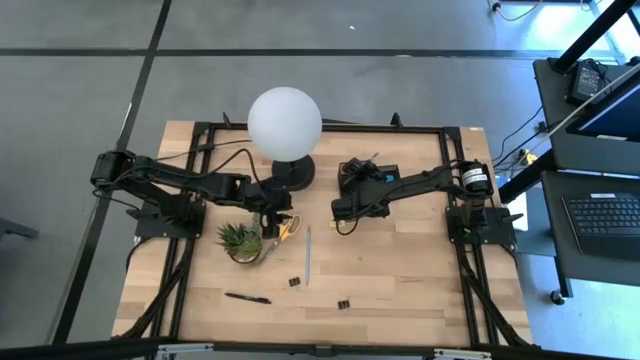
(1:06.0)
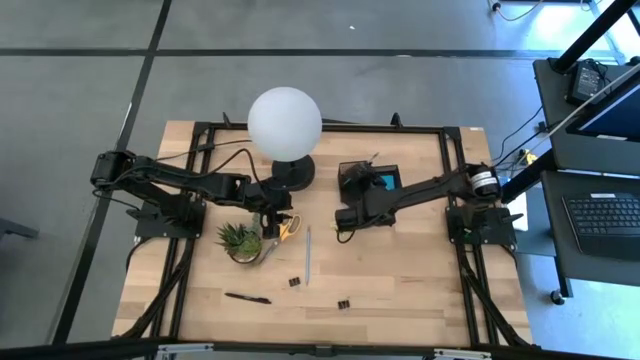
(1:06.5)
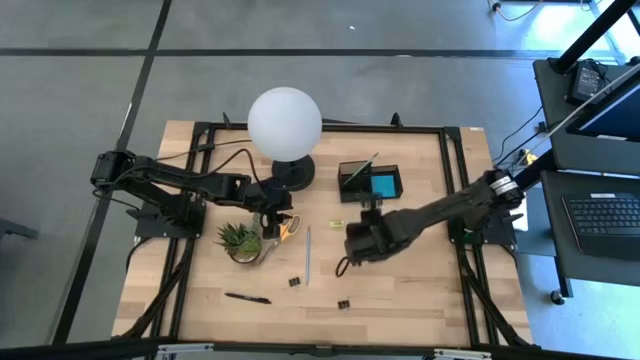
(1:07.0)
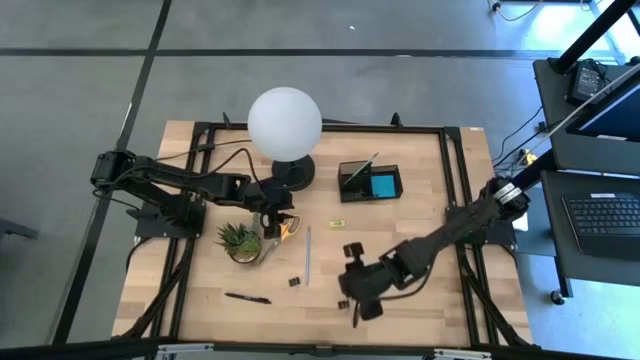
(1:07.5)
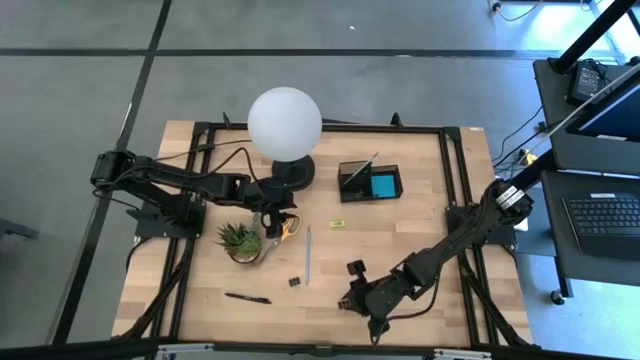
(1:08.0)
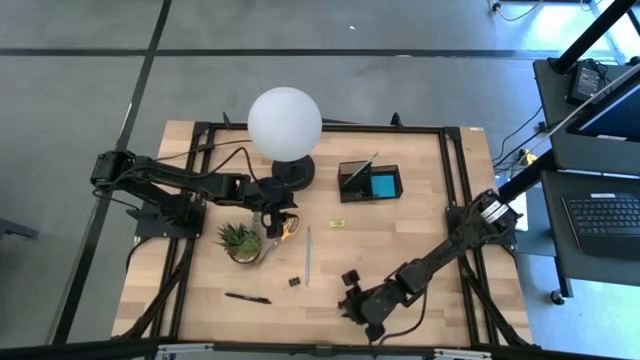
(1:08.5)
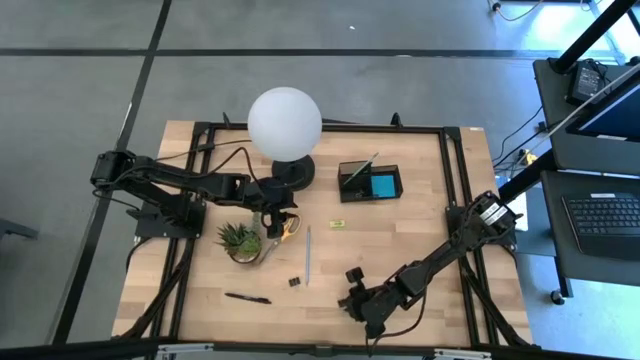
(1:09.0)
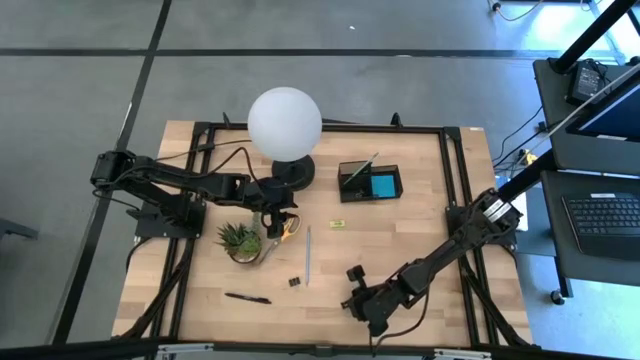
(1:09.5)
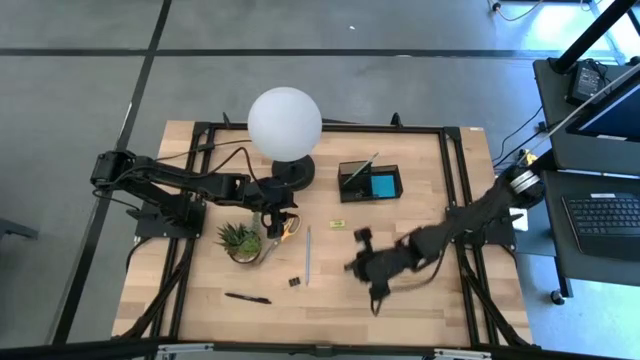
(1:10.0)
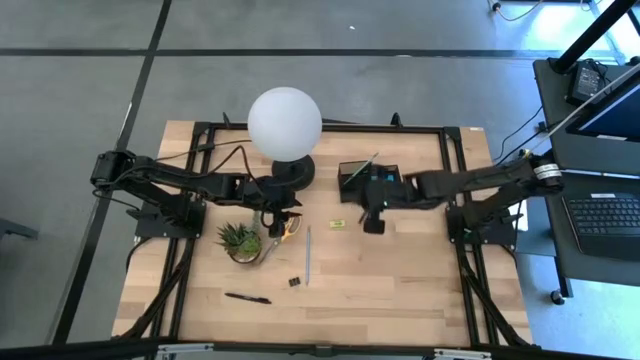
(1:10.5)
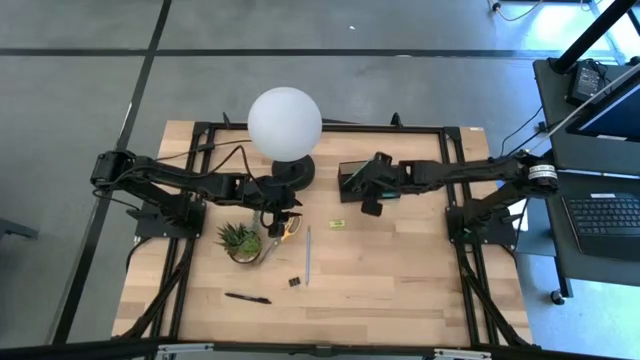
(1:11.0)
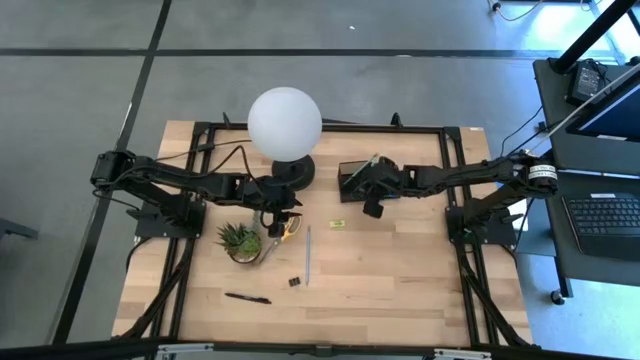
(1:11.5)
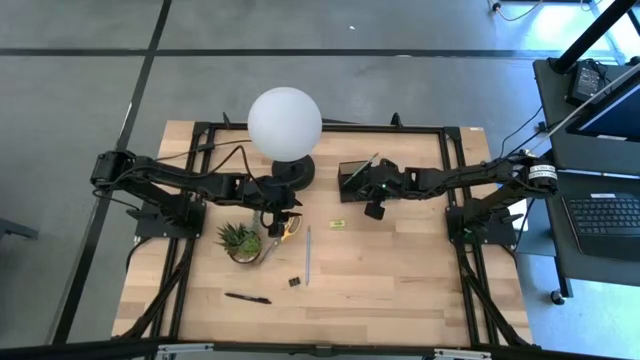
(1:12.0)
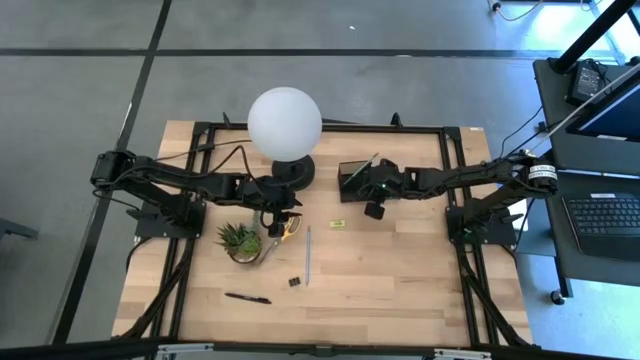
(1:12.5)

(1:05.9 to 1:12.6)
Task: Pick and place office supplies into organizer
Put the right black binder clip into the desk organizer

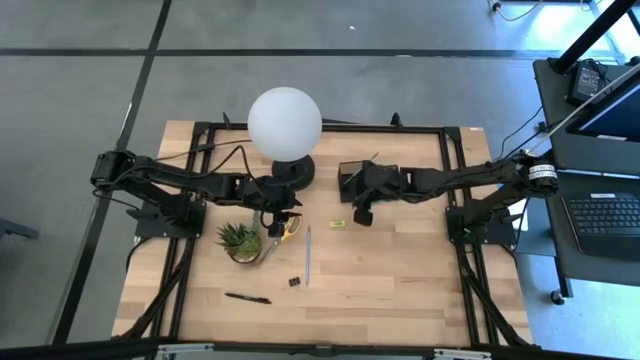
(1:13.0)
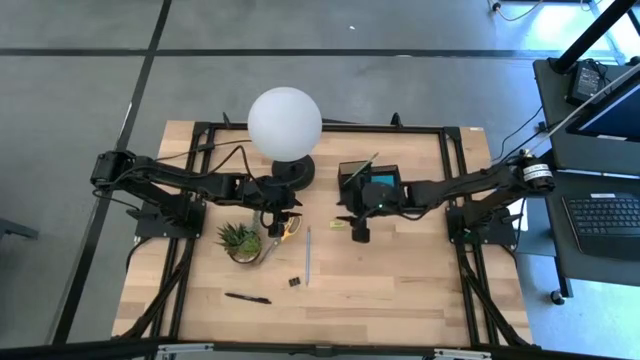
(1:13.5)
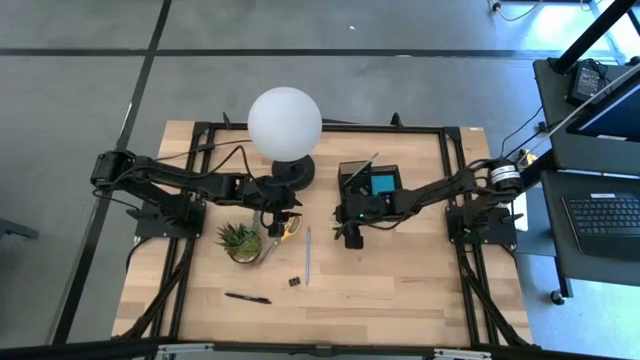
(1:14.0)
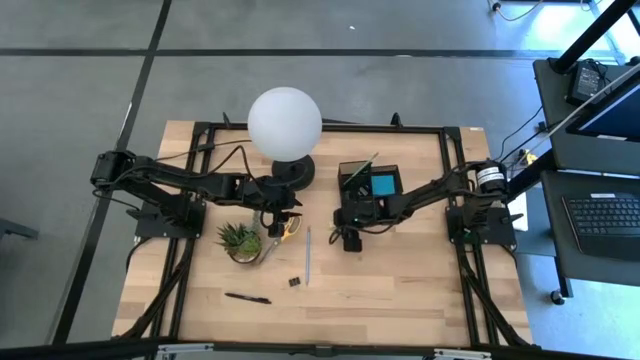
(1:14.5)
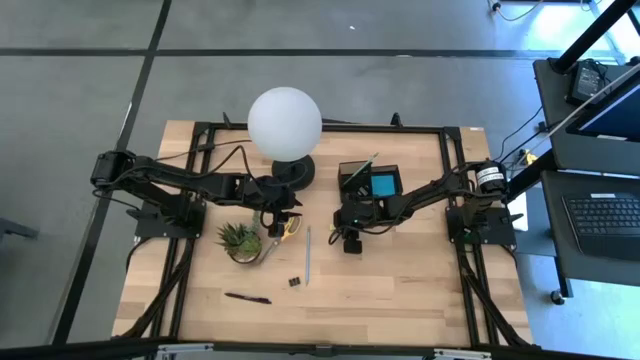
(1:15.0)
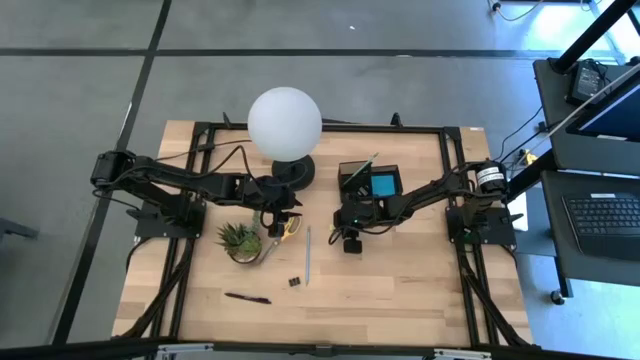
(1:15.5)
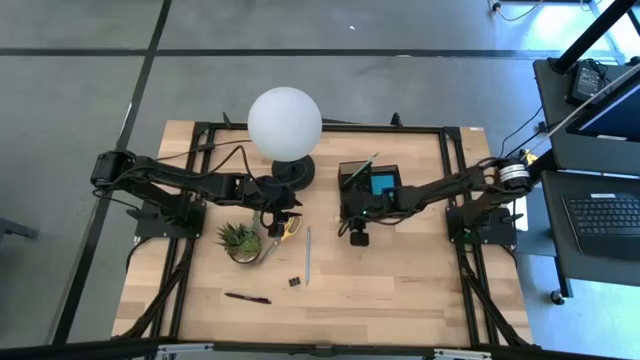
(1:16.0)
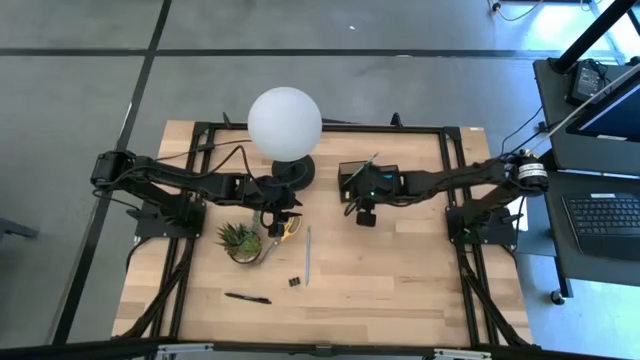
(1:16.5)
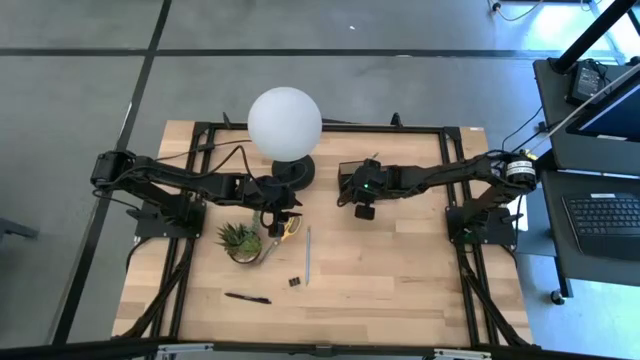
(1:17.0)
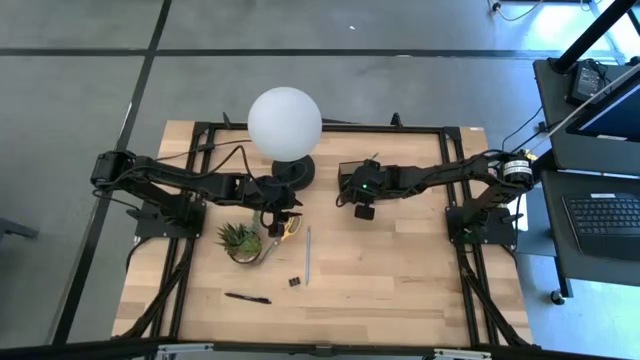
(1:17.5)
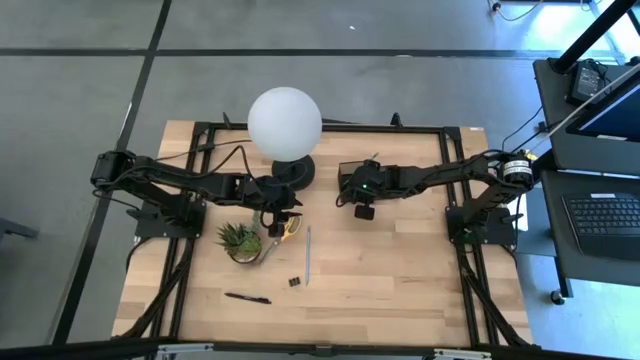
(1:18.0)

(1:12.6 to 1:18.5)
Put the green eraser into the desk organizer

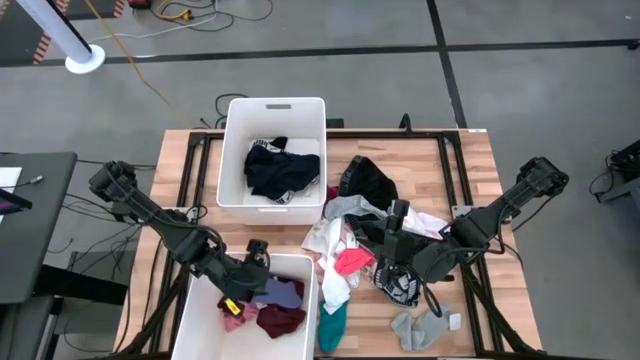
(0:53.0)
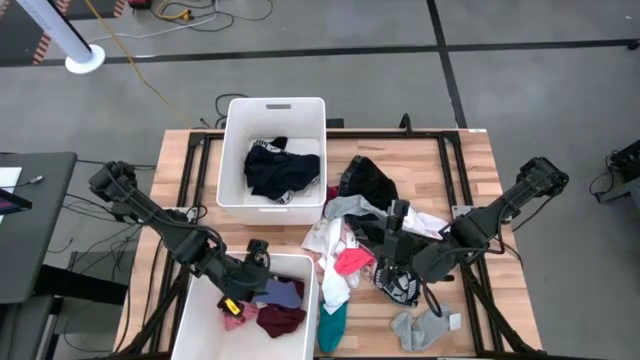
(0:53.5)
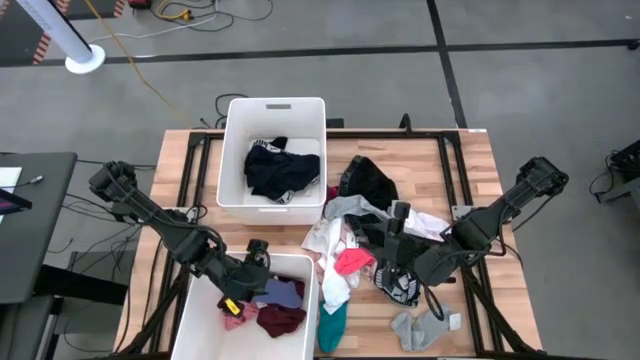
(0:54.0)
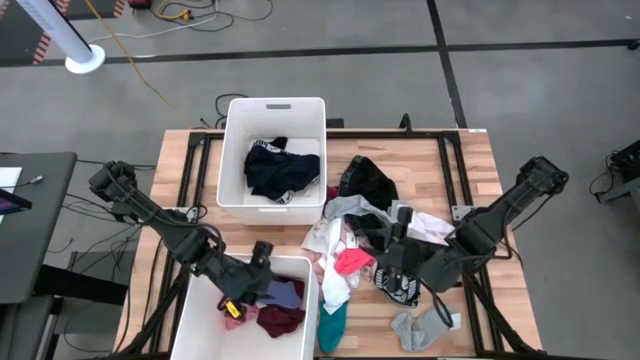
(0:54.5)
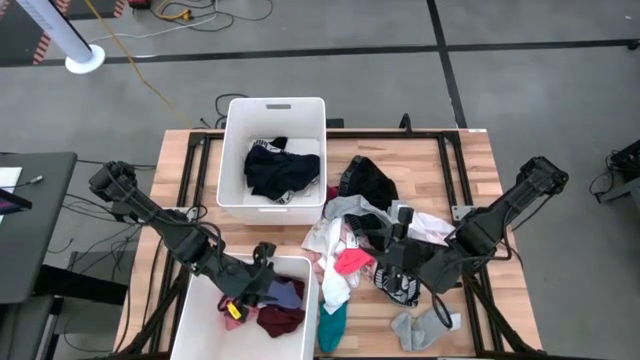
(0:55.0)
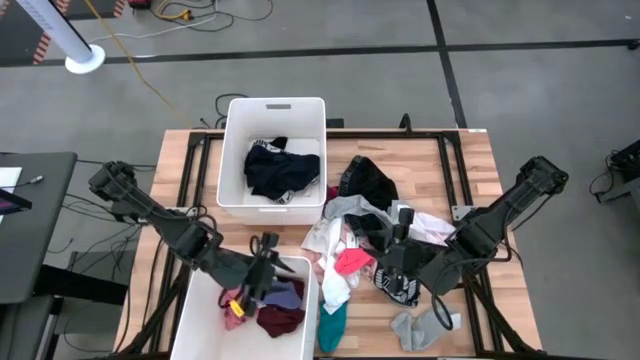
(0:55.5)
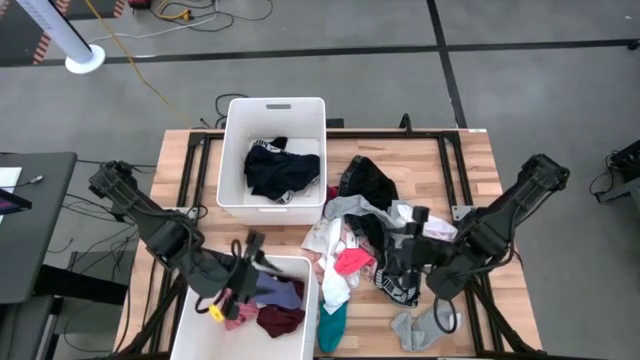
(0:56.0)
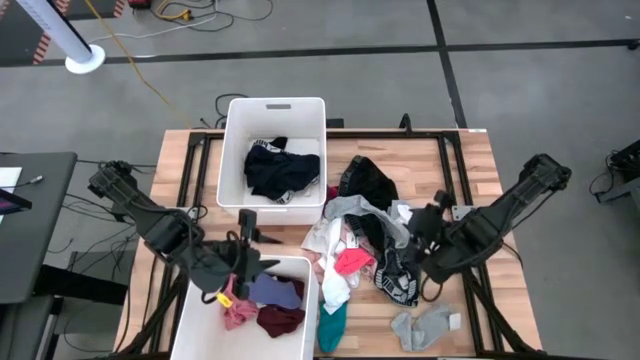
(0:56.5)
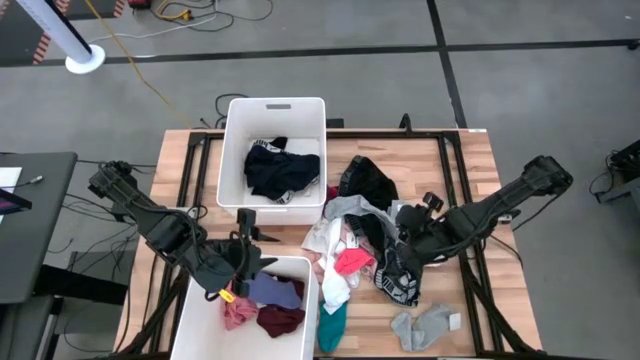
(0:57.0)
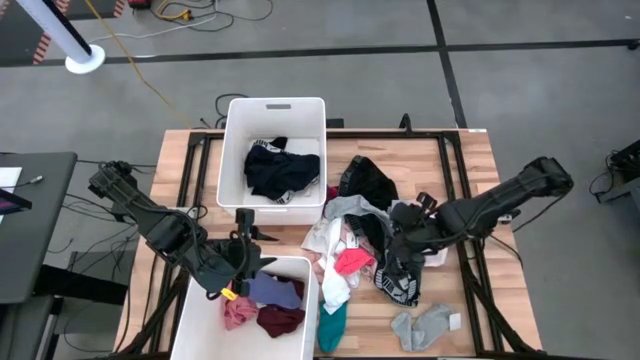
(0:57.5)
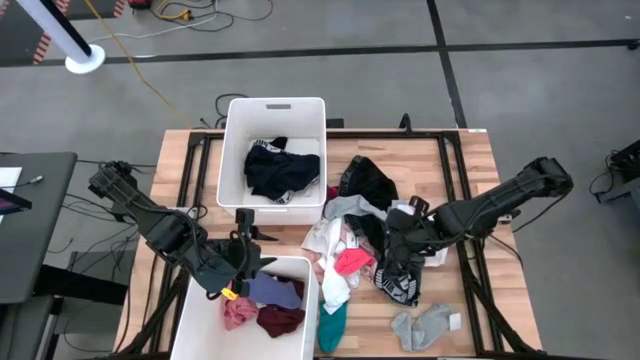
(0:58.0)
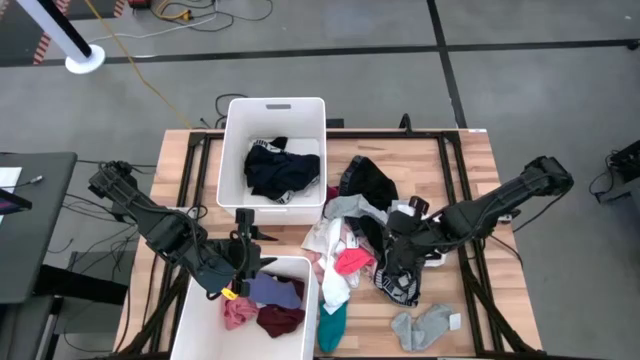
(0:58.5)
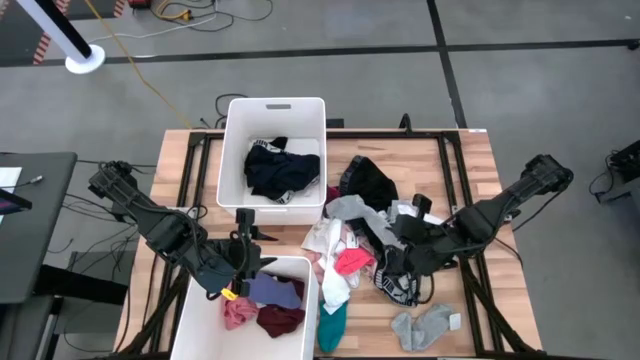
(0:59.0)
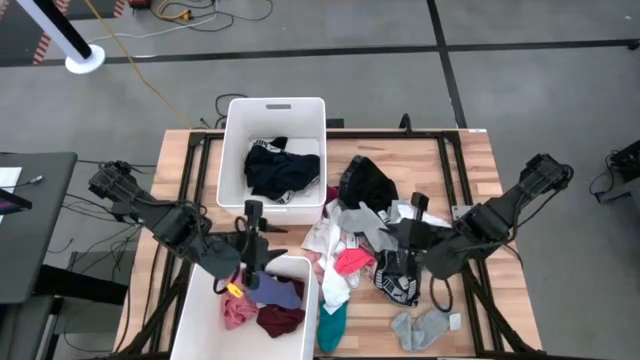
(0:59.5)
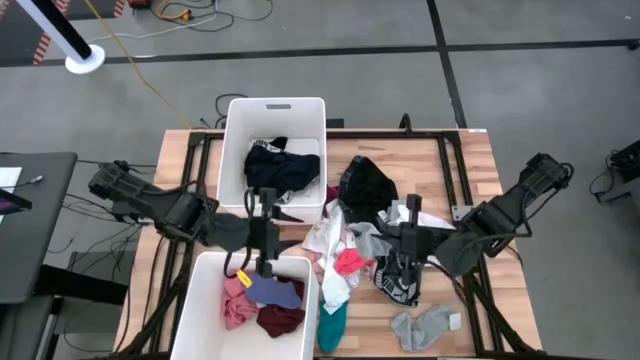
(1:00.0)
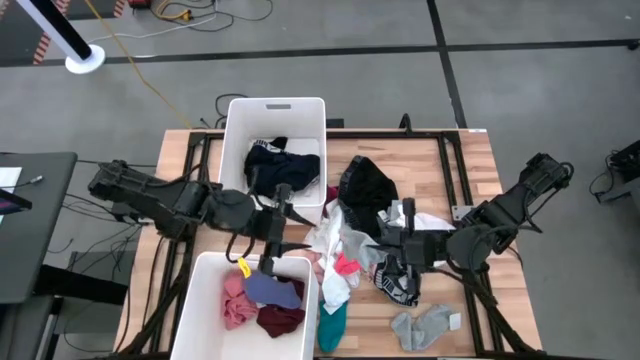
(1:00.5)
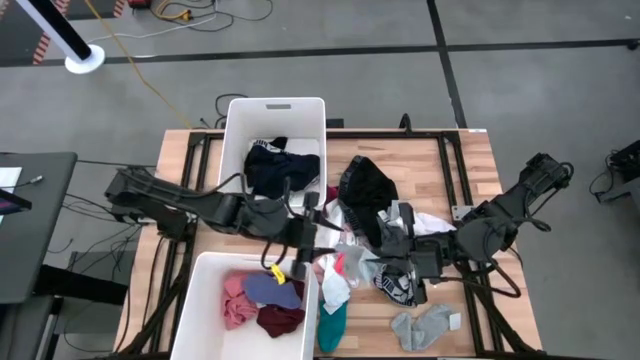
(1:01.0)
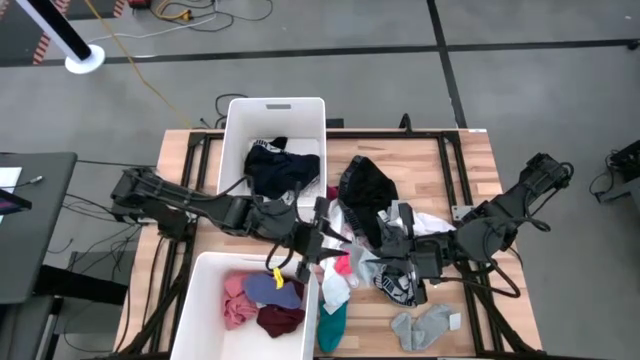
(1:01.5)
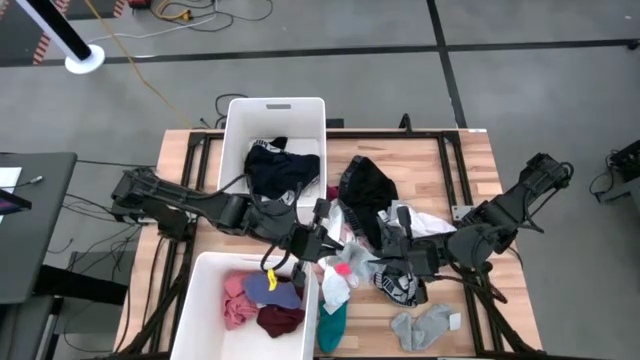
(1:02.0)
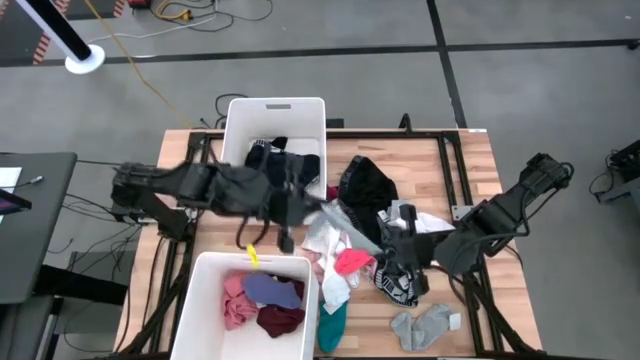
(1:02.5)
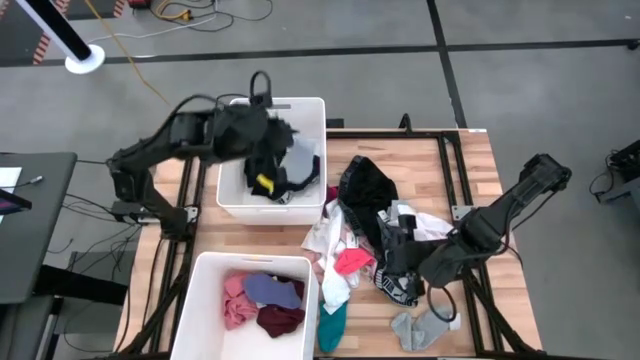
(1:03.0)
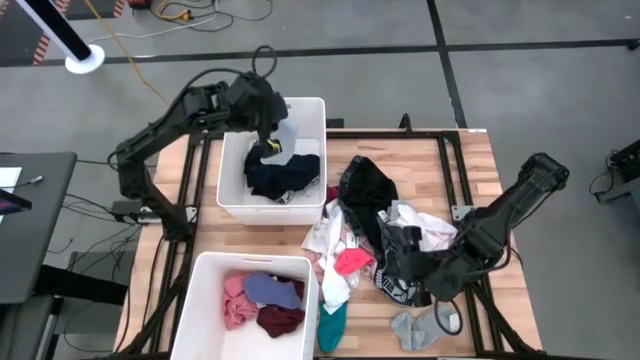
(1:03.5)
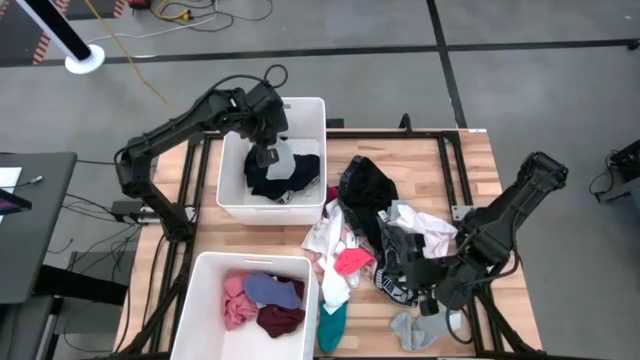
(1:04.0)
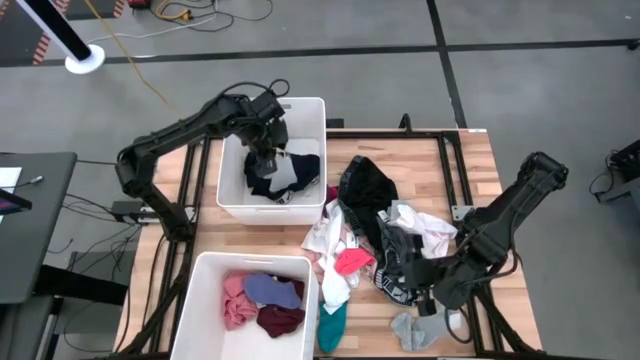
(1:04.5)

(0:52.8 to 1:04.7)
Task: Sort clothes
Put the gray sock into the top white laundry bin
